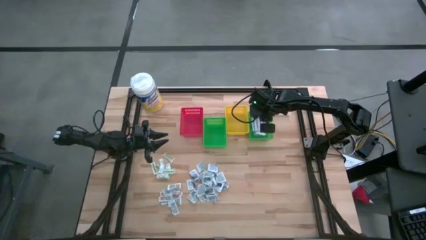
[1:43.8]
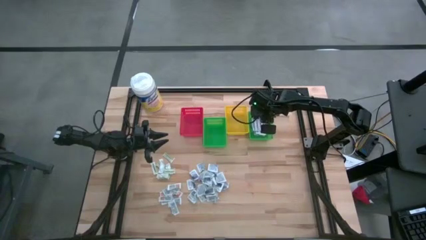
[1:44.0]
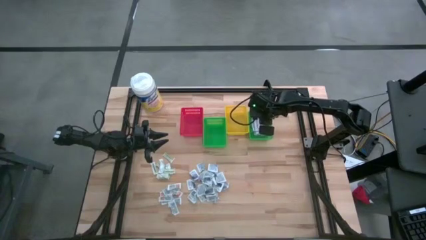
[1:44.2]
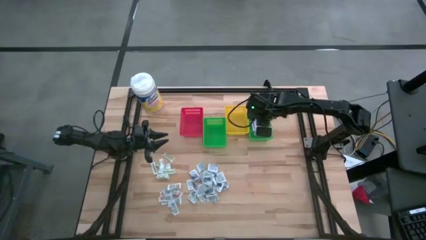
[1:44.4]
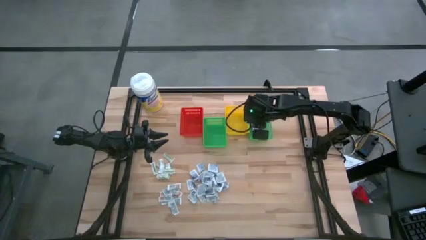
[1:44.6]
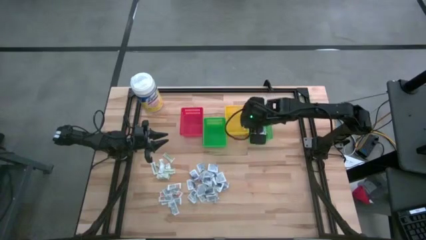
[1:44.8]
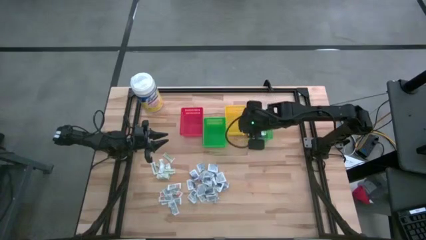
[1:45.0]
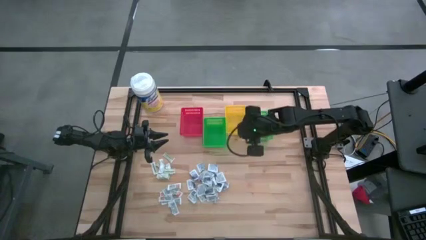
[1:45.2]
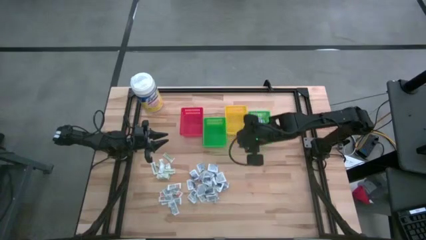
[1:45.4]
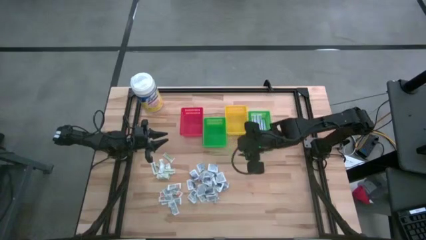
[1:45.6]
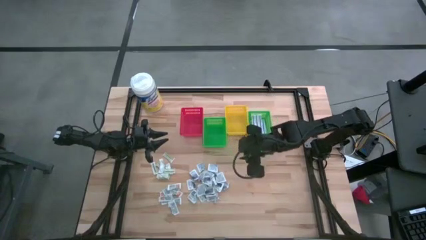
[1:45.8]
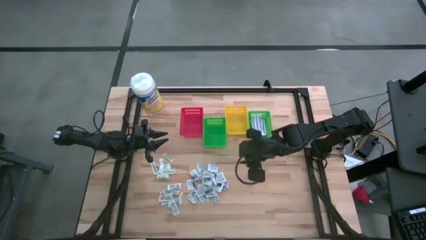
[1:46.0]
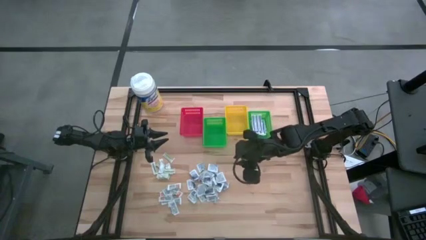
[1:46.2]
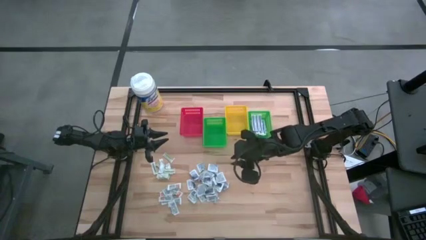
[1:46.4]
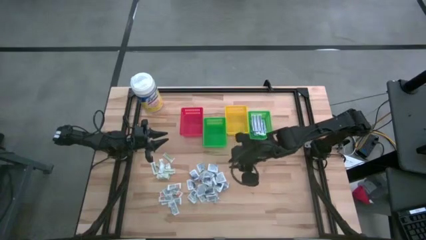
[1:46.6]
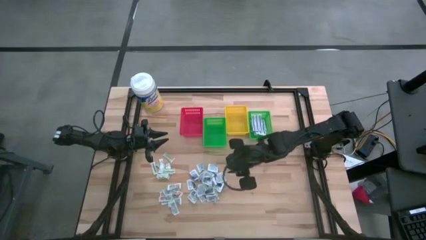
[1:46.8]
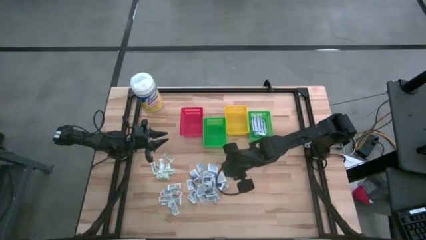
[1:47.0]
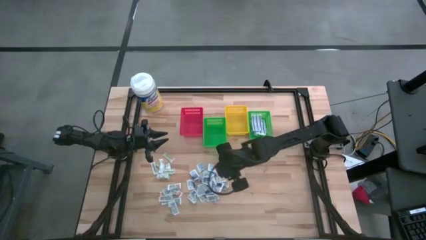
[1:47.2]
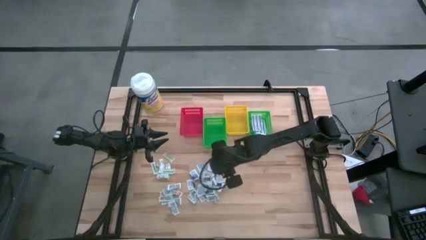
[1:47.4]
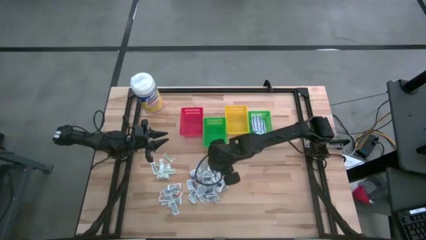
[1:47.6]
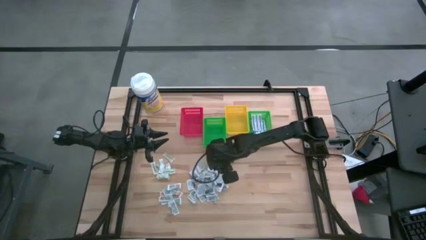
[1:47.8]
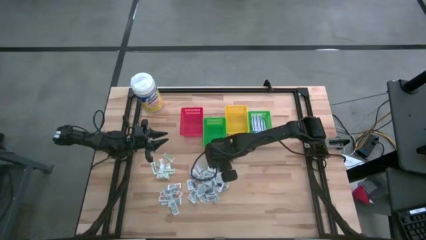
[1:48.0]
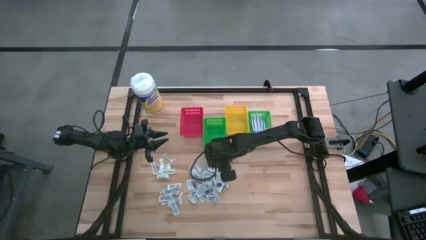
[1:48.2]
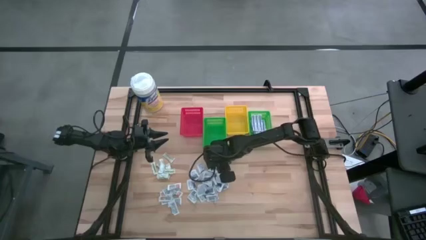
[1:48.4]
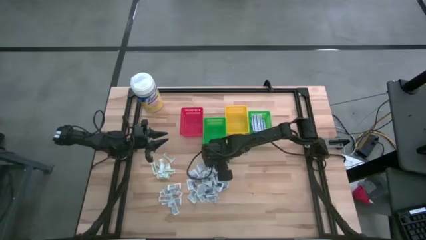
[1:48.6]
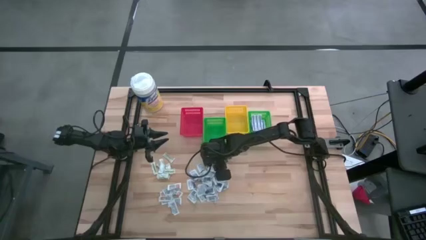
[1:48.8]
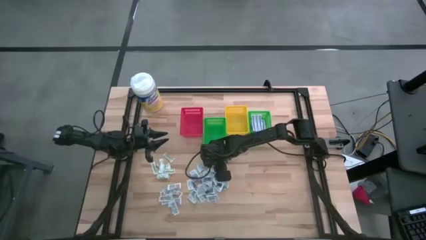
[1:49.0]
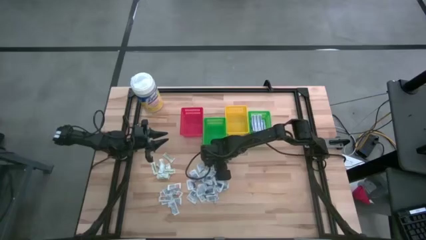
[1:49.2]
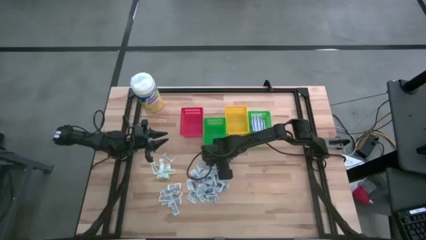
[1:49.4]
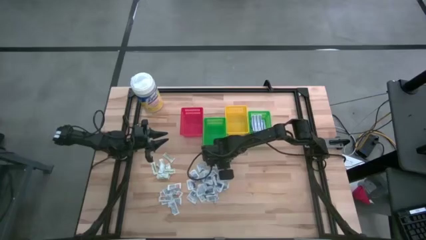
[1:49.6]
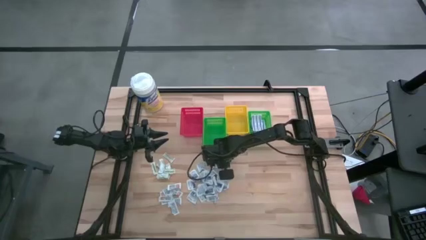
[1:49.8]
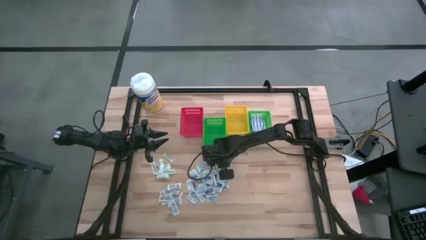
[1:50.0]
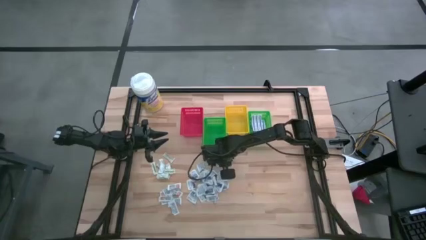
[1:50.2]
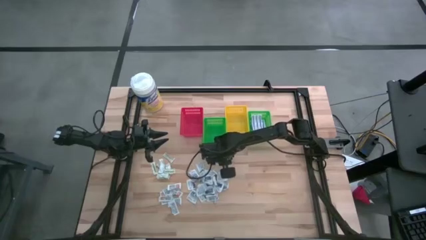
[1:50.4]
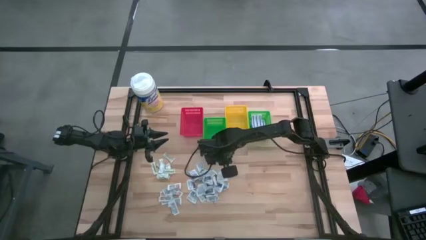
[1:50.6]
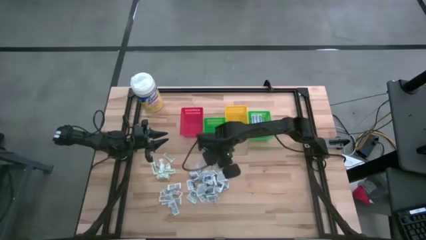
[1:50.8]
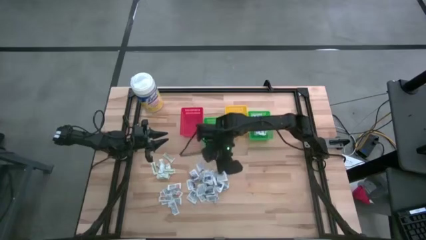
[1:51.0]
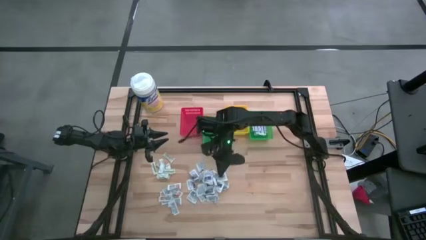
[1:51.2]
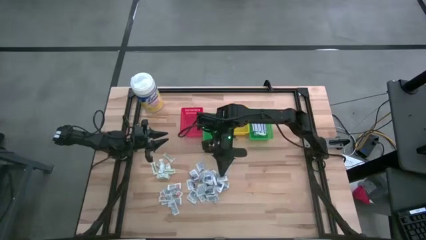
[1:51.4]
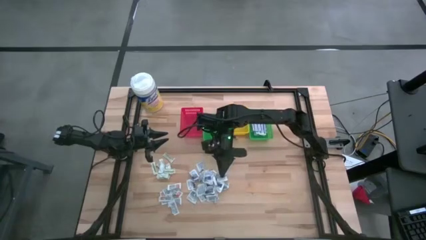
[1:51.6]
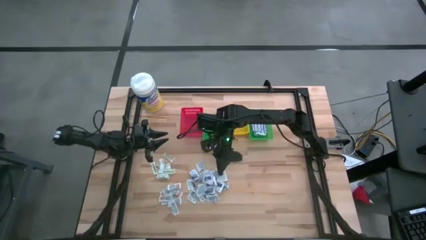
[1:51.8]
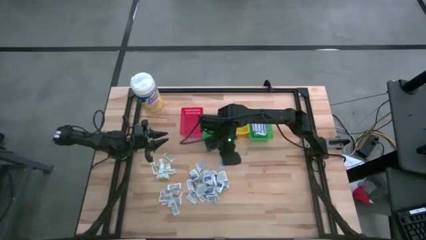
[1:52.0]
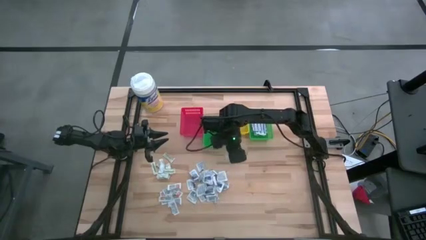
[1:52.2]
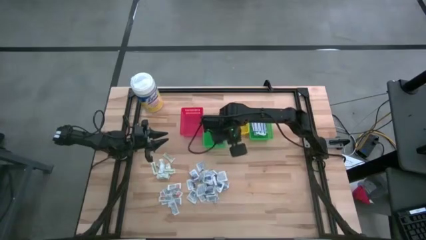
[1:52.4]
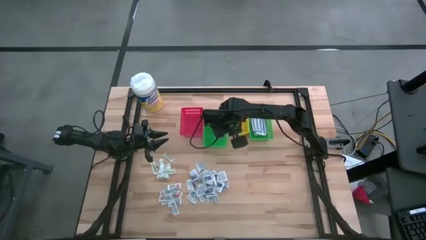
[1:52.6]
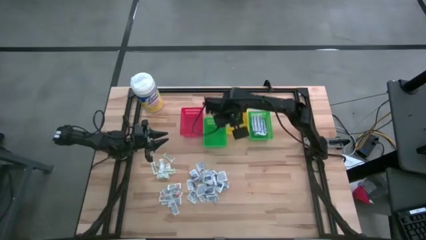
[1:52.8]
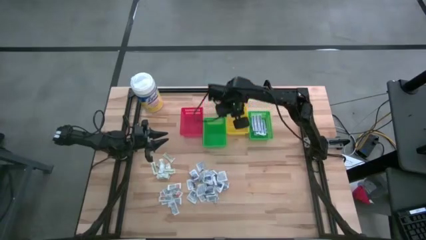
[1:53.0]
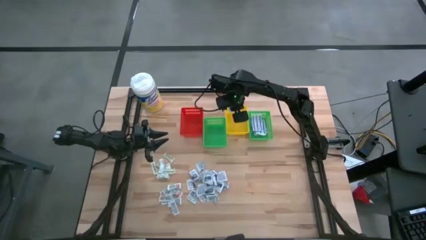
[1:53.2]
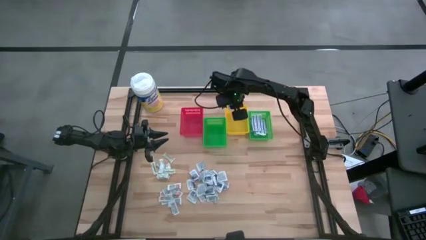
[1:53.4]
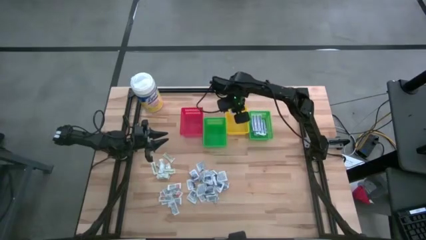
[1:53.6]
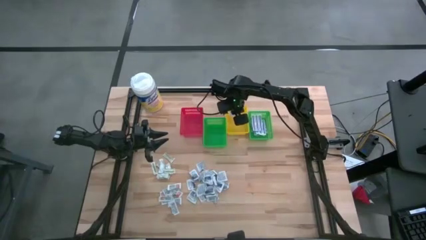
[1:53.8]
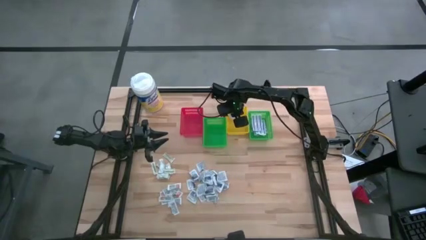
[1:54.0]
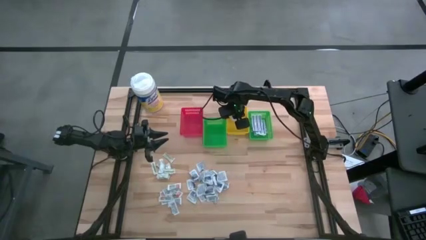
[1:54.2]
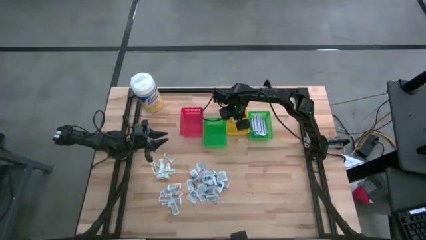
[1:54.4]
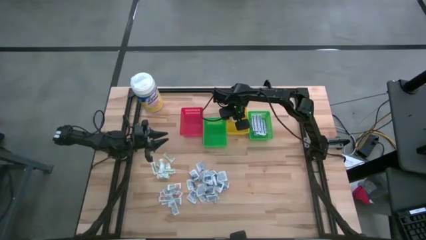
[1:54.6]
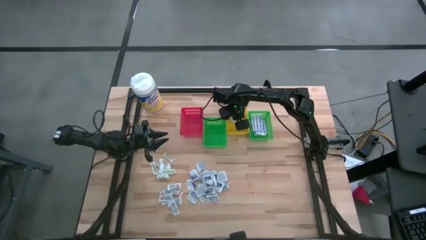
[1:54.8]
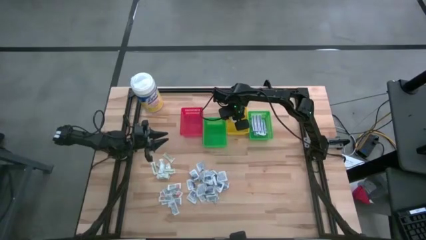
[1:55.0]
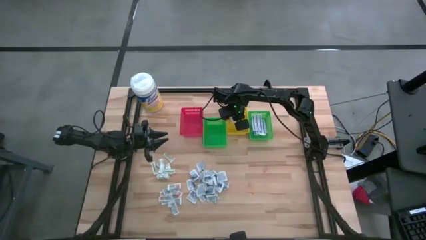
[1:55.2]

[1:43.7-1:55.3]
Task: Pick & Place First Aid Supplies
Put the alcohol pad into the yellow basket

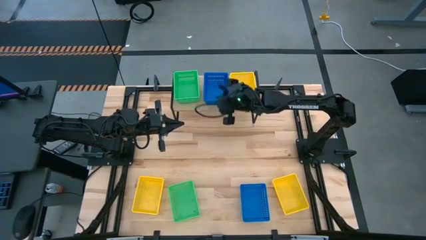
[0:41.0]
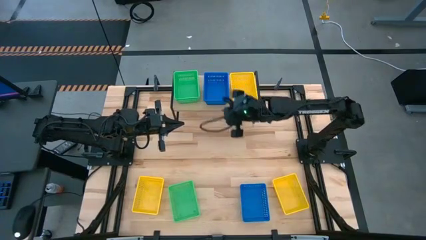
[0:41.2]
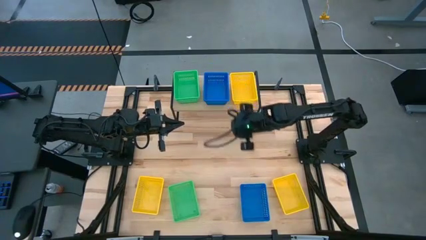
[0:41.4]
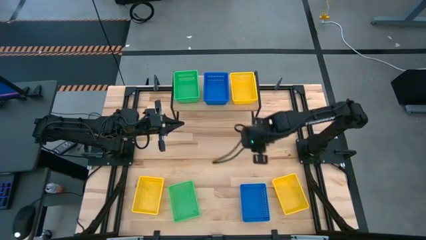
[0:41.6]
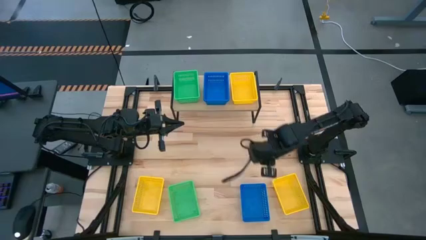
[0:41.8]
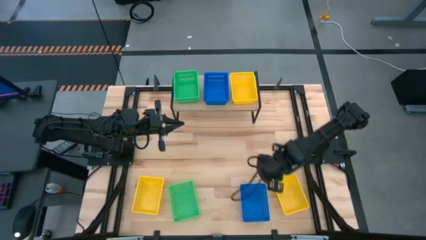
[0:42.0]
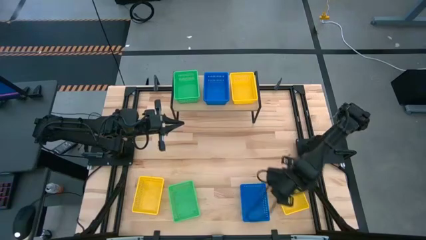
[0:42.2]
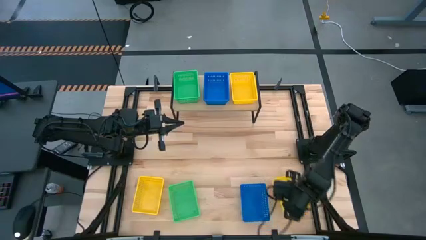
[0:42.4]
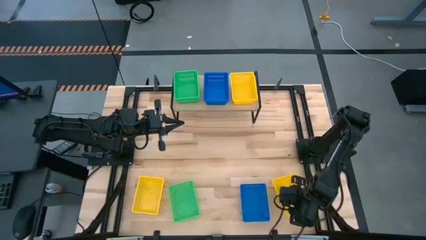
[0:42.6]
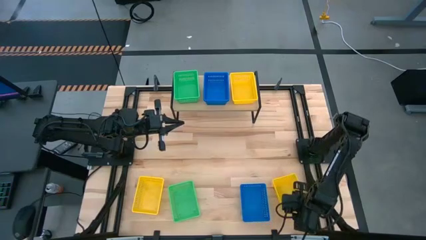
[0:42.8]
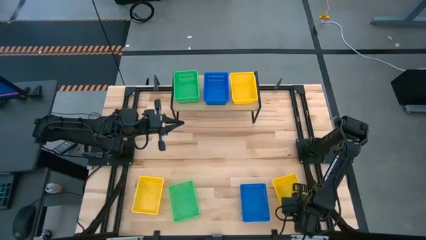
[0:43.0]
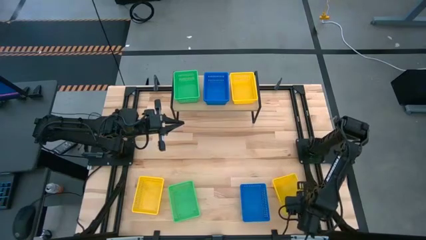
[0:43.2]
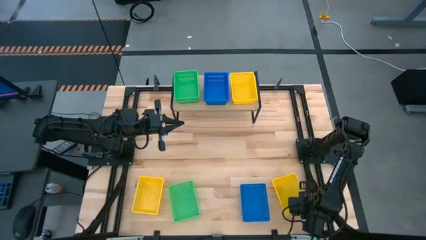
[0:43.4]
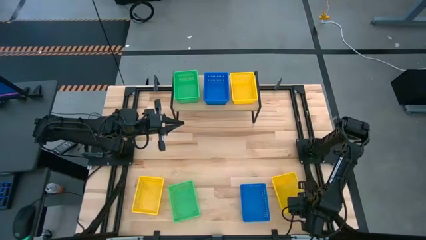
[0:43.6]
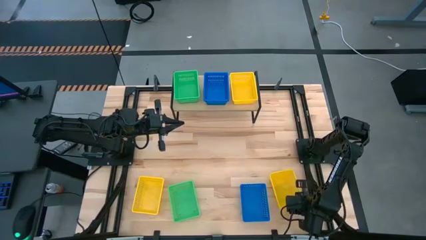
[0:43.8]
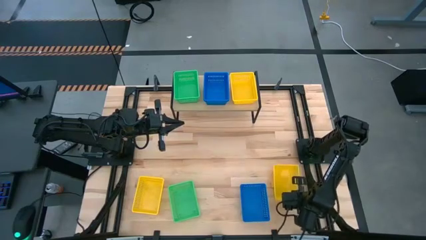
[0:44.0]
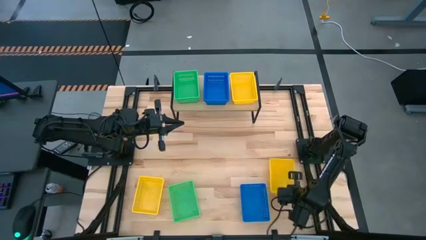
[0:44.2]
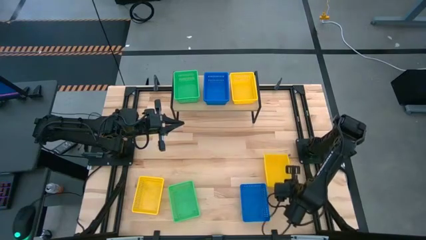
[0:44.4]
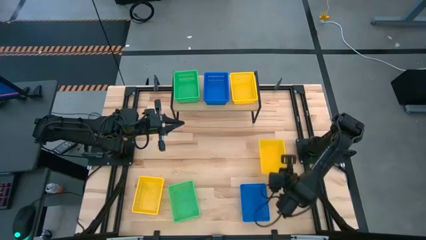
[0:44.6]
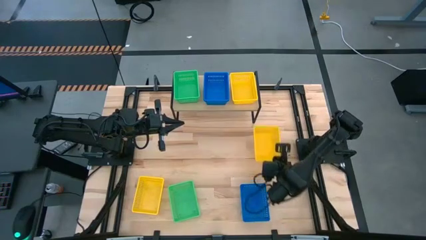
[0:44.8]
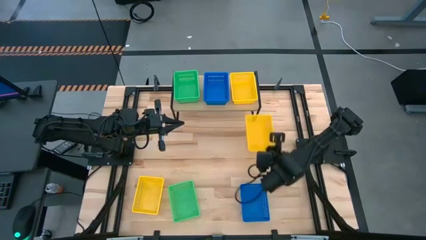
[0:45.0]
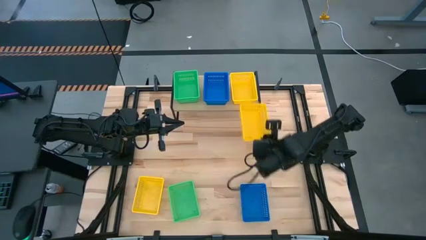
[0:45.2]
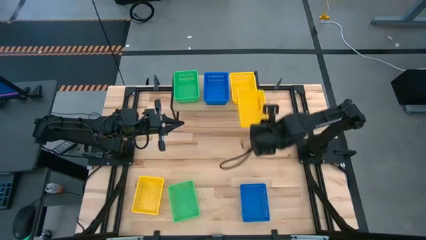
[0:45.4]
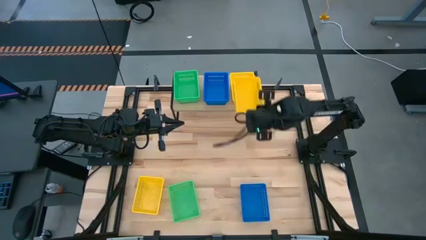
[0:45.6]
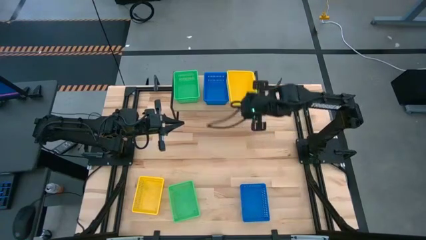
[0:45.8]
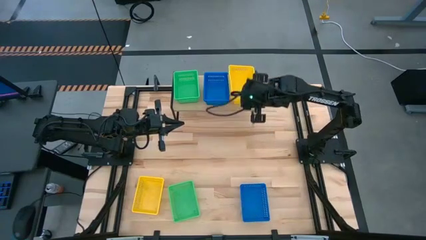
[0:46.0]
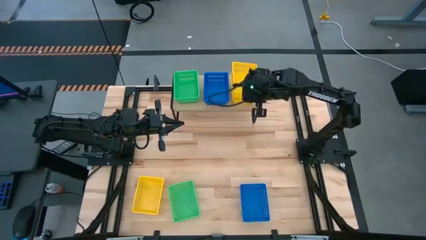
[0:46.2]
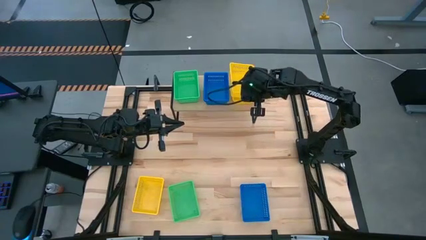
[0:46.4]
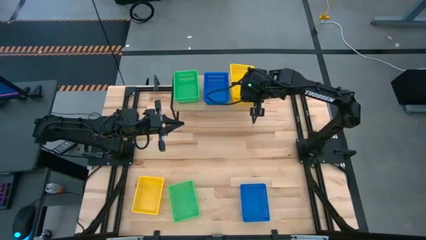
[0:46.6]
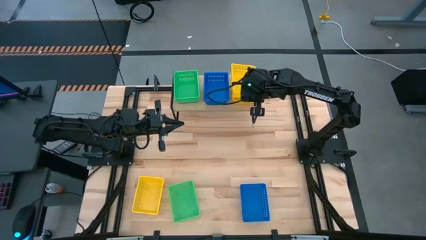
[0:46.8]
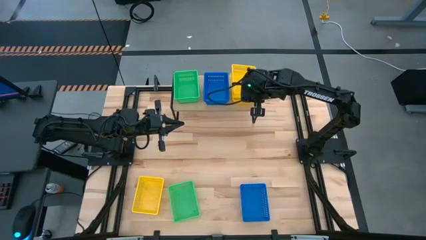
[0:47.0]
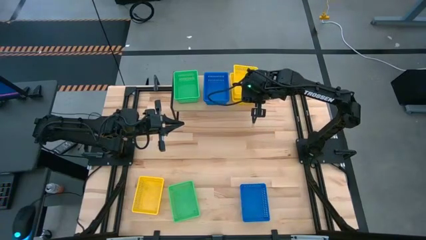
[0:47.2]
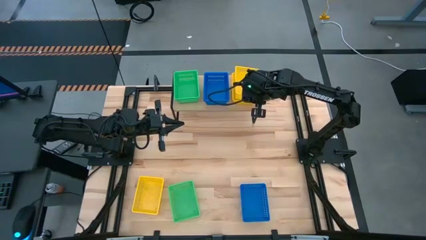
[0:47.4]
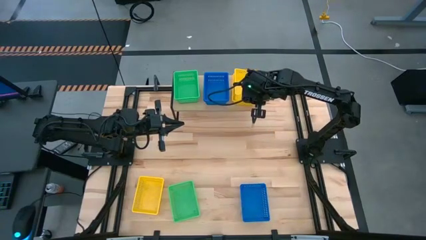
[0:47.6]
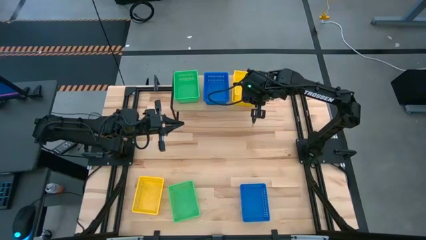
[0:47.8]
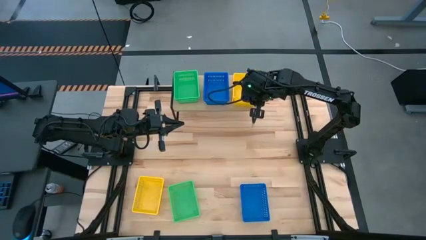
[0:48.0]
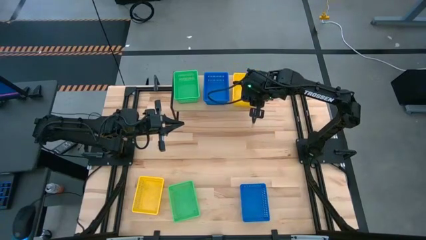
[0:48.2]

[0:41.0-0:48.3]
Task: Stack baskets on shelf by color
Stack the right yellow bin on top of the yellow bin on the shelf
